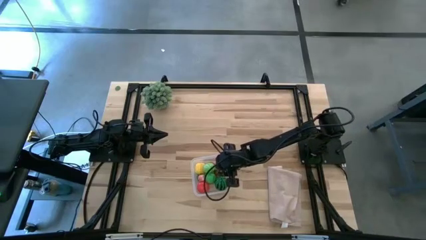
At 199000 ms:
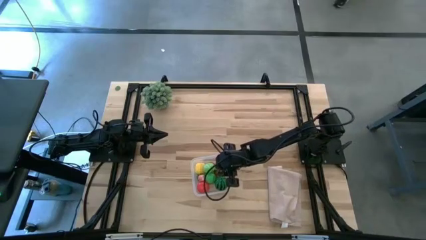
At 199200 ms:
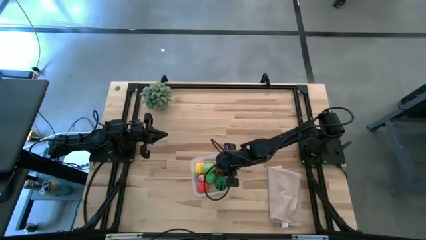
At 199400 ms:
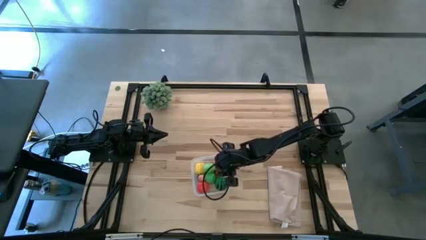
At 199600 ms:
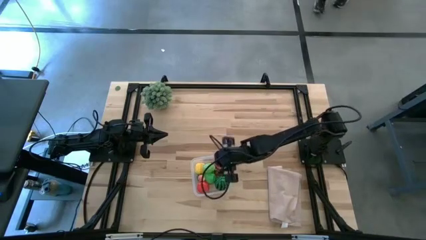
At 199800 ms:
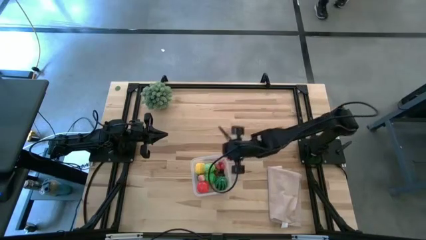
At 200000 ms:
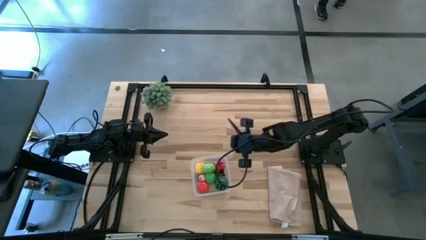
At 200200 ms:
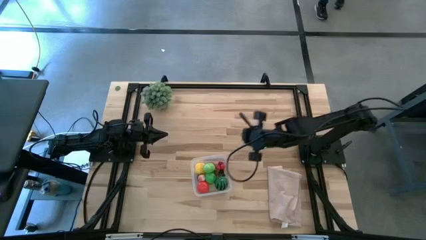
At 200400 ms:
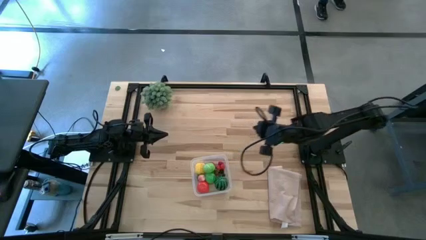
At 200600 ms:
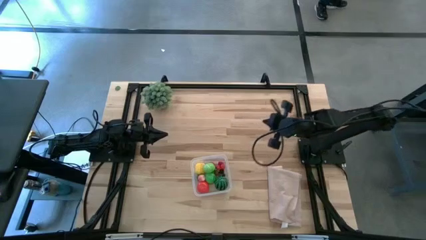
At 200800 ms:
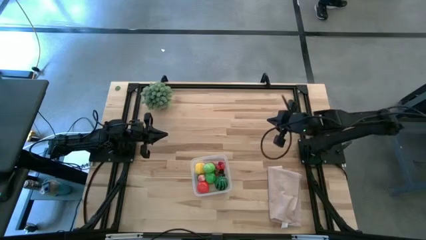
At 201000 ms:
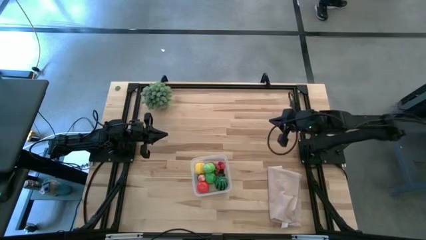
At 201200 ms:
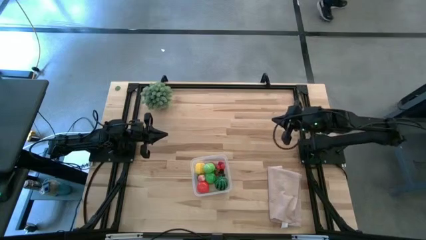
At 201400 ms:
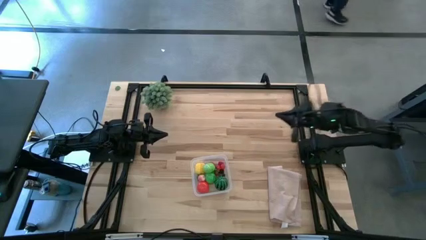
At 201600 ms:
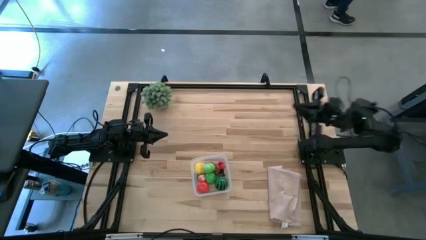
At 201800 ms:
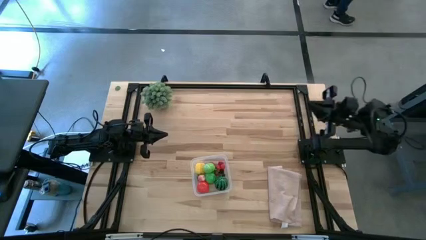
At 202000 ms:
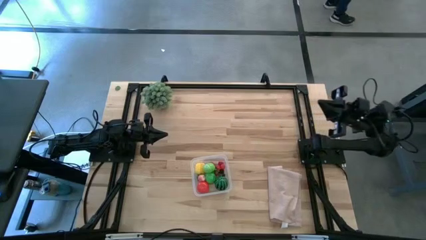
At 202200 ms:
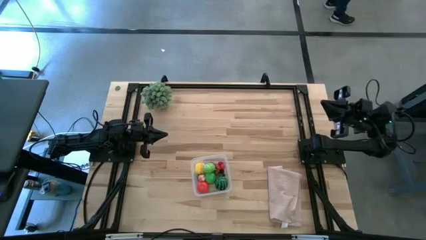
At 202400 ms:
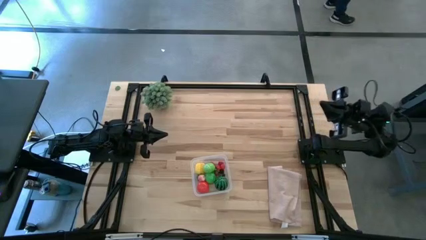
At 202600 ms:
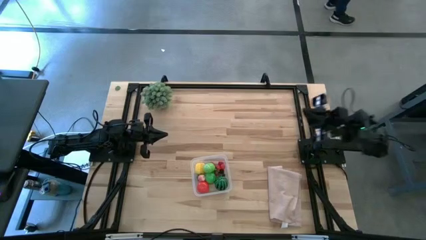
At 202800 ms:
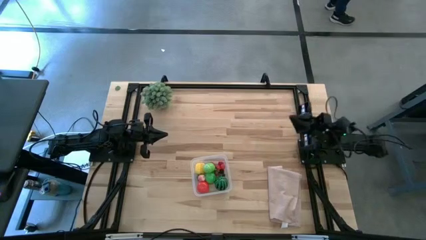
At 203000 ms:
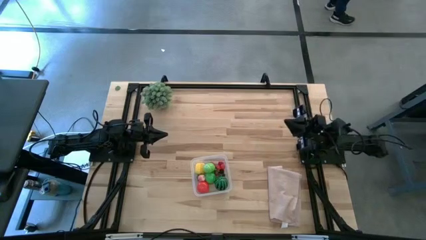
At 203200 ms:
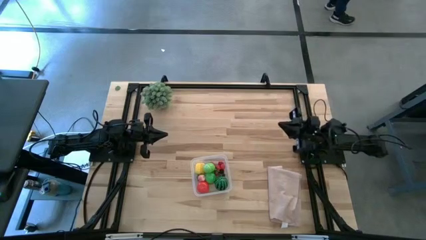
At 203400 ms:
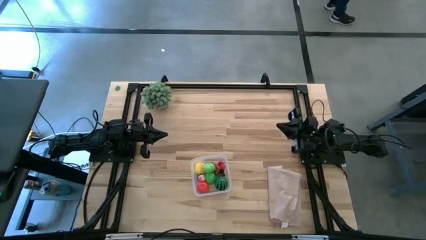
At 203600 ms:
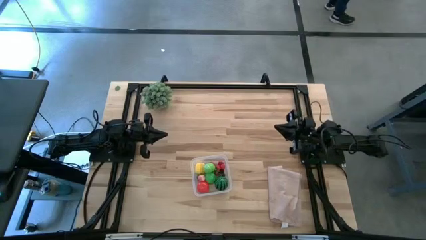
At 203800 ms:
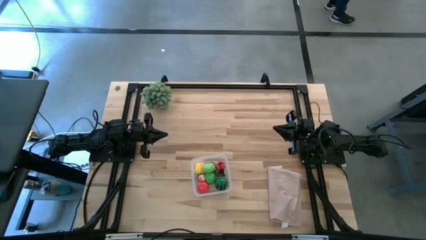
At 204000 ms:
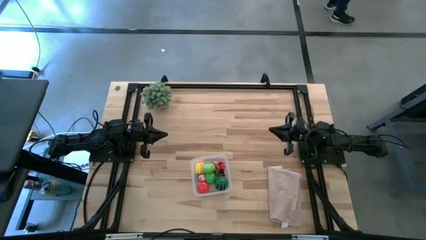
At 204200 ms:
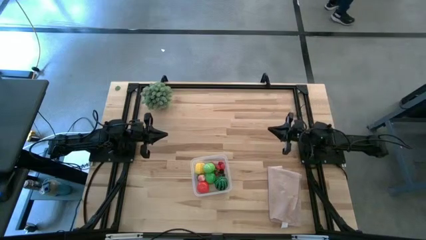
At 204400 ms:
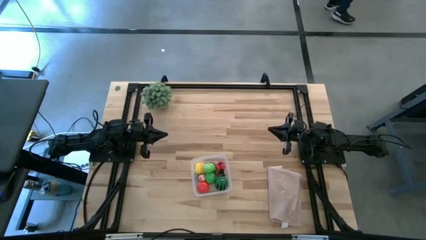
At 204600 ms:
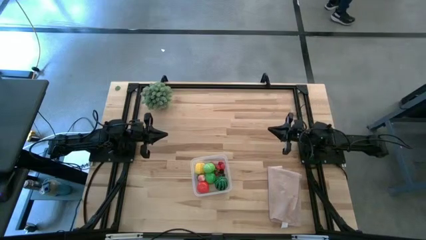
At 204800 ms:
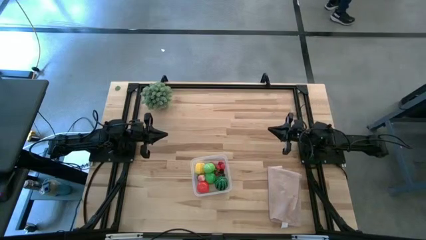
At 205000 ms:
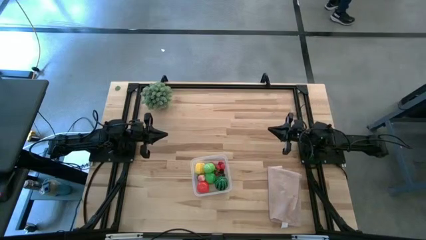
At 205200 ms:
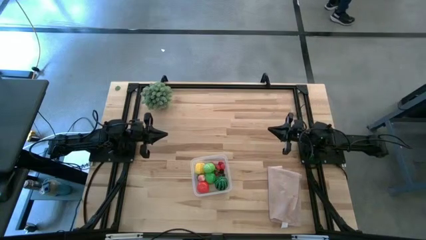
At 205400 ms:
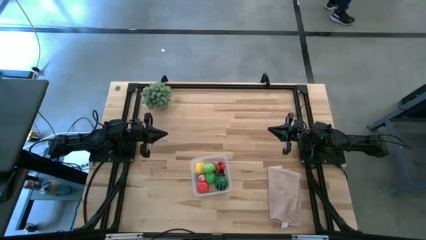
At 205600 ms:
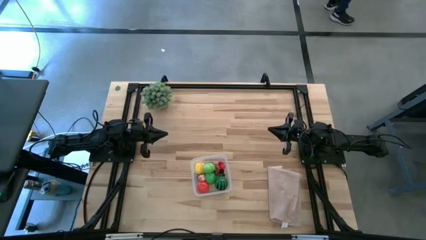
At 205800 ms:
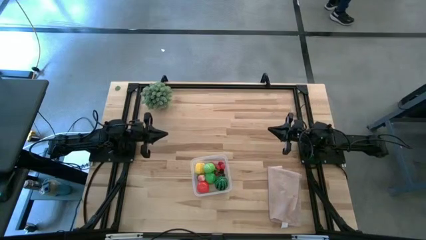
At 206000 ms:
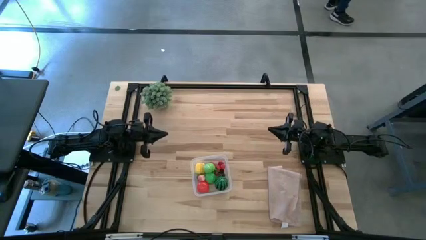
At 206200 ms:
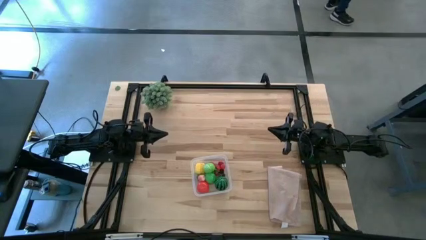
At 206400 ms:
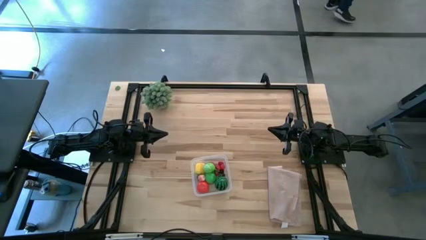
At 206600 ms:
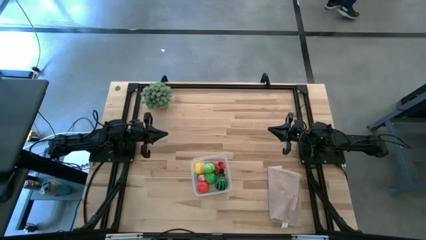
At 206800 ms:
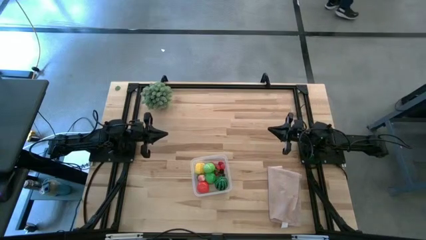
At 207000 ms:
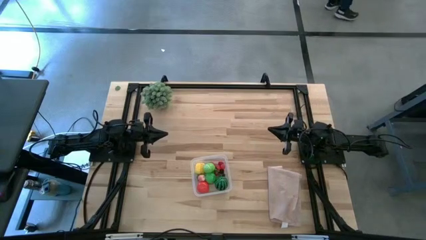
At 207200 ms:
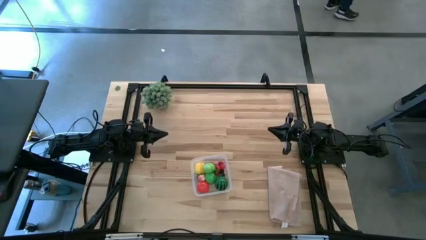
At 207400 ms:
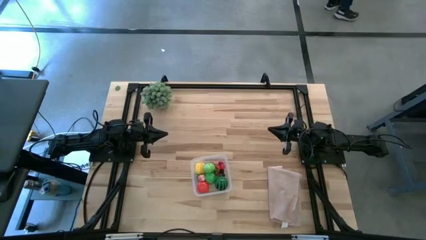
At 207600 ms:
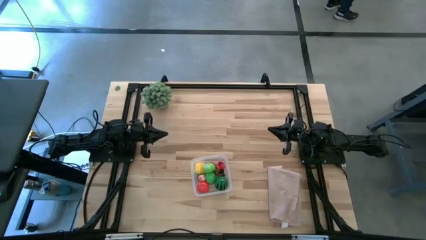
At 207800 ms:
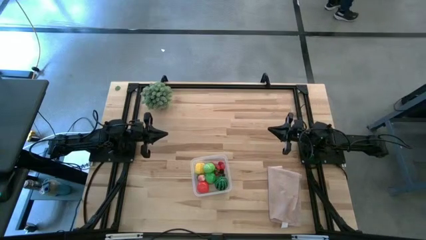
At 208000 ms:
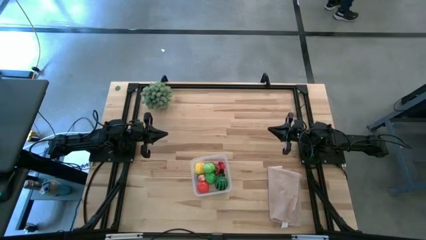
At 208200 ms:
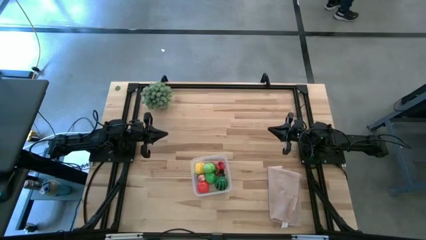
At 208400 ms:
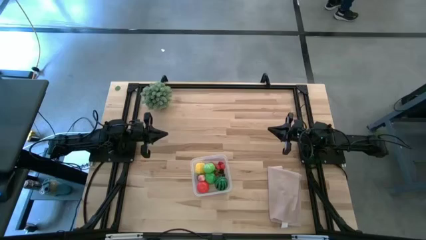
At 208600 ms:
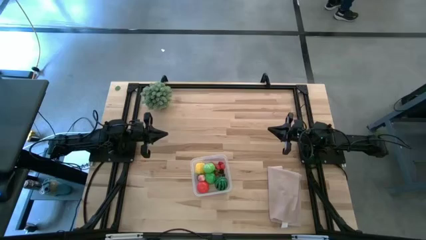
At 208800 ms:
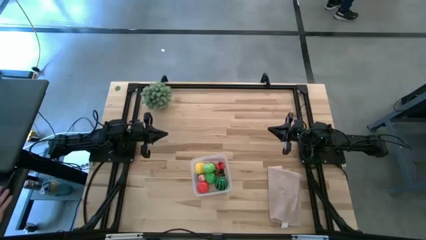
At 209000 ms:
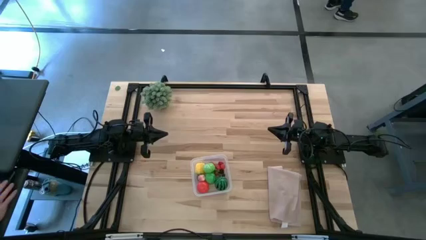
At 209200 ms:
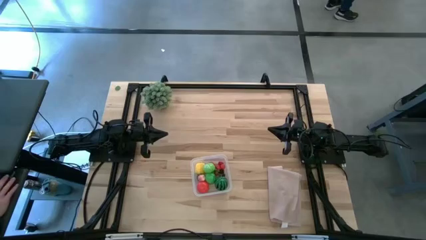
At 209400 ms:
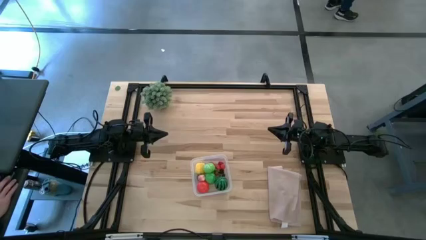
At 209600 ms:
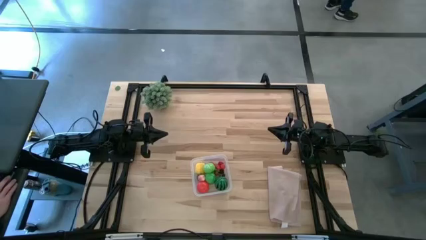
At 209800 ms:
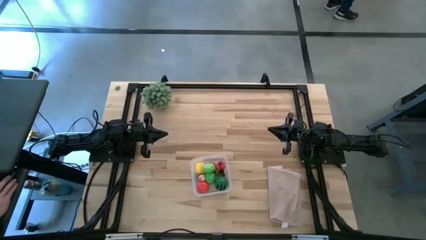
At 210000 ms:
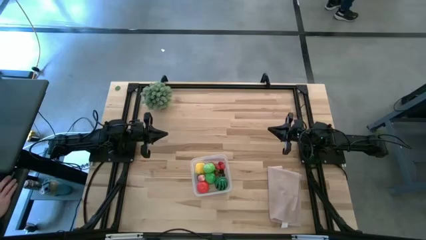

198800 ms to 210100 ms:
Task: Pick and placing Produce into tupperware
Return to Home Position
